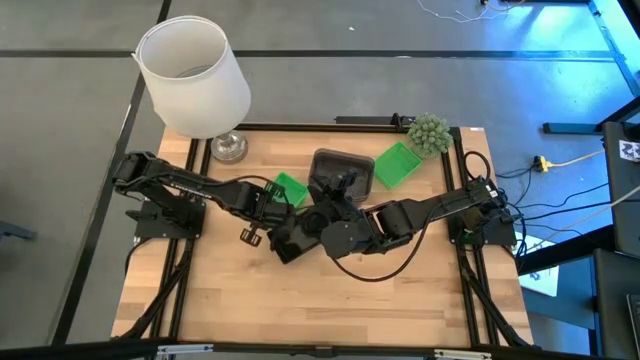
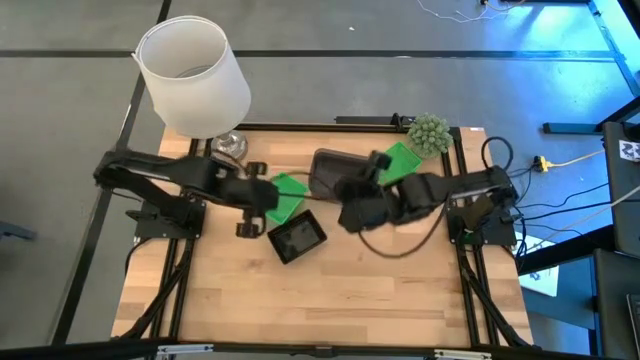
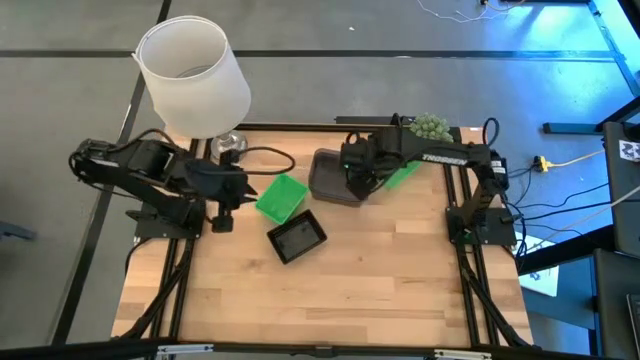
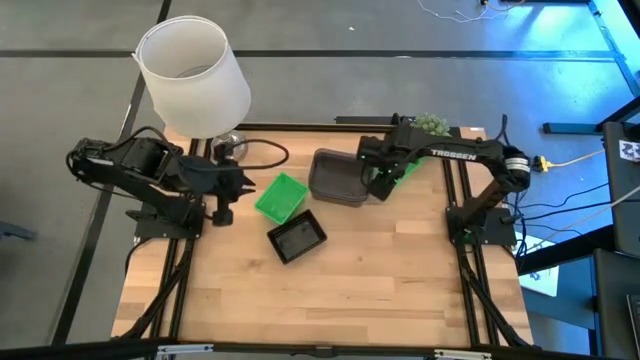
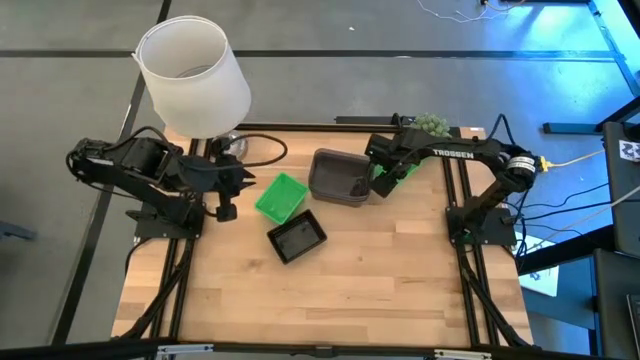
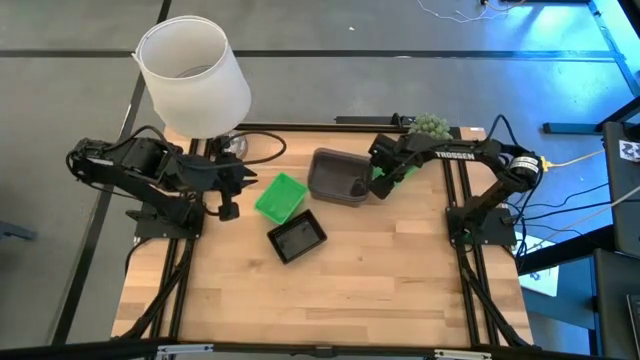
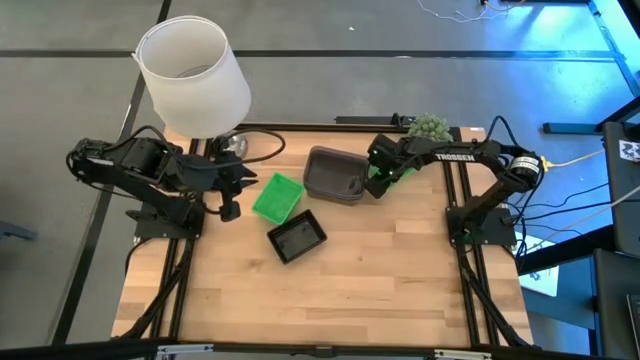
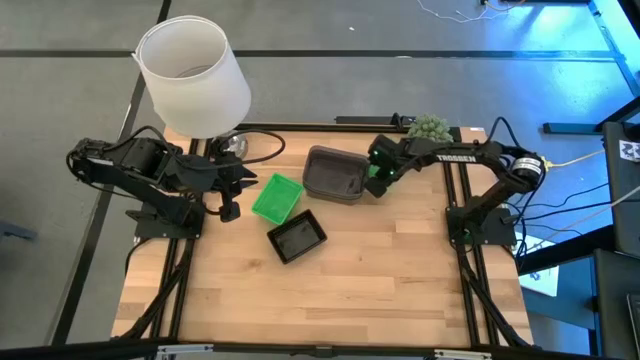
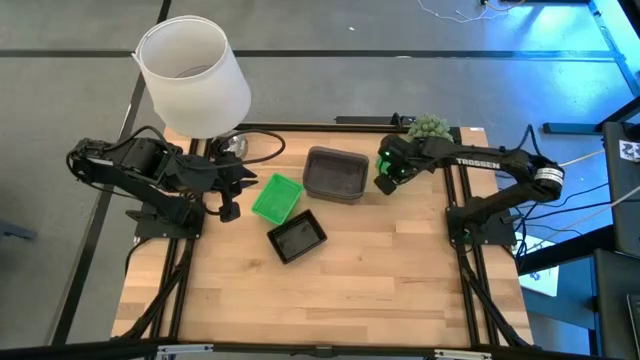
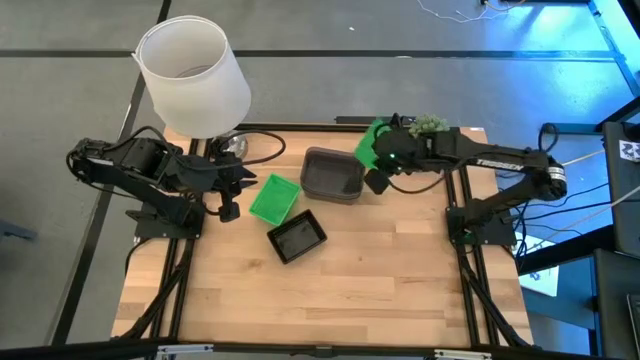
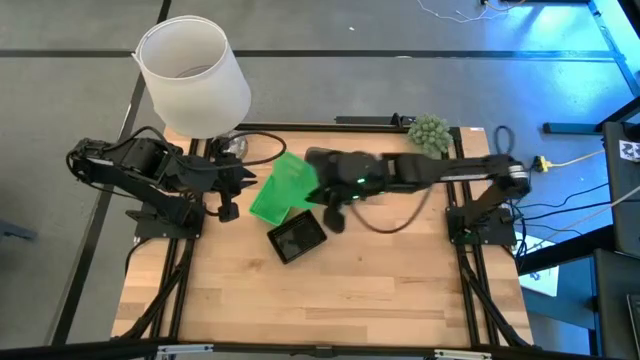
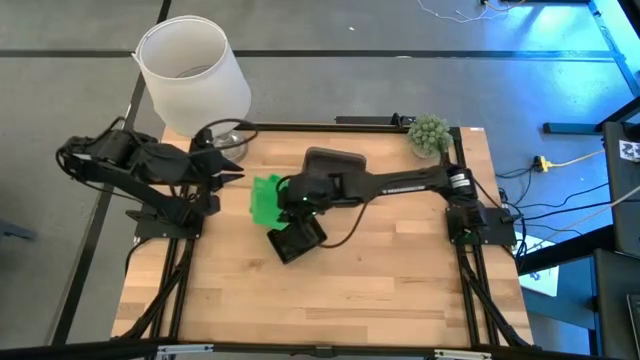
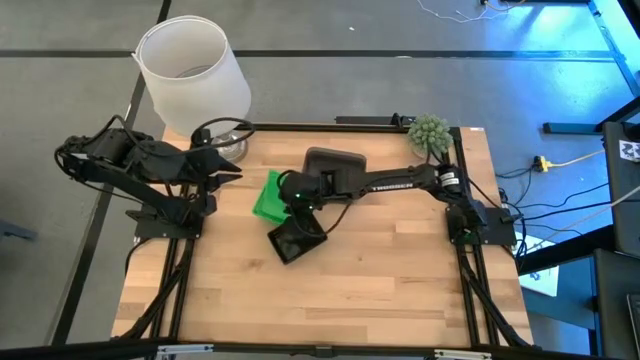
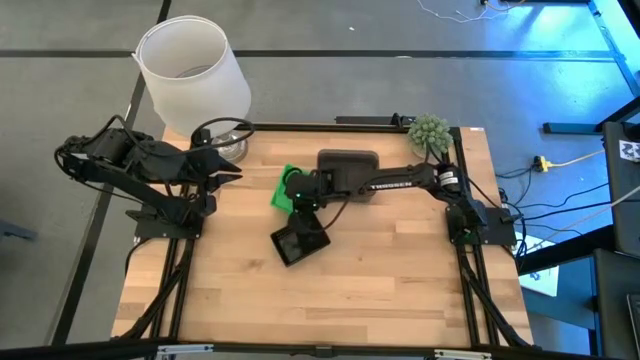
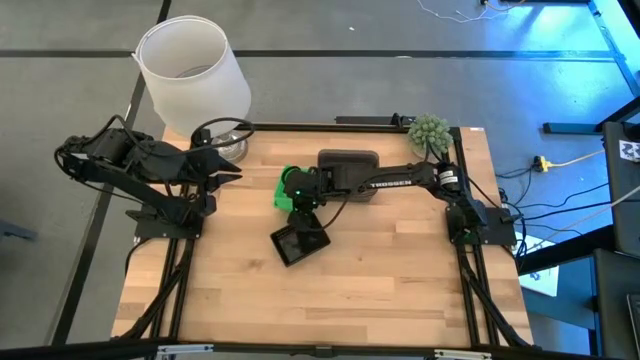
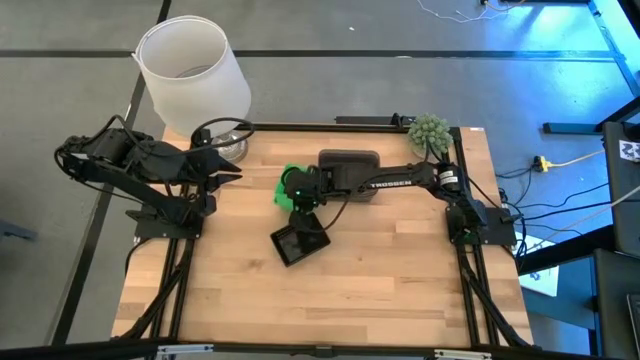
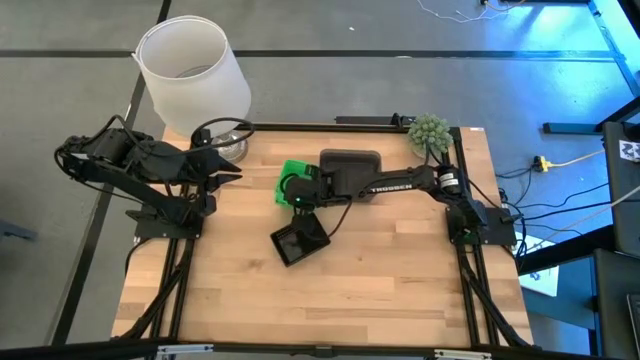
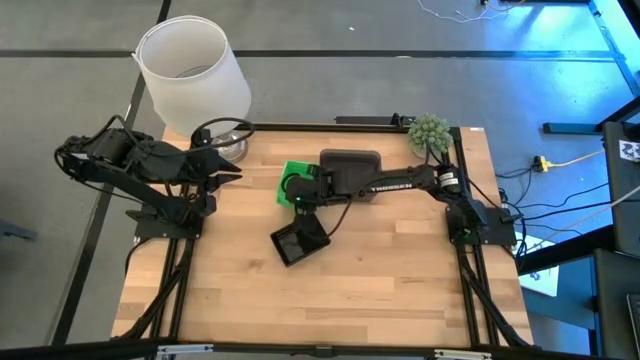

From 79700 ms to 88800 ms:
Stack the right green basket on top of the left green basket

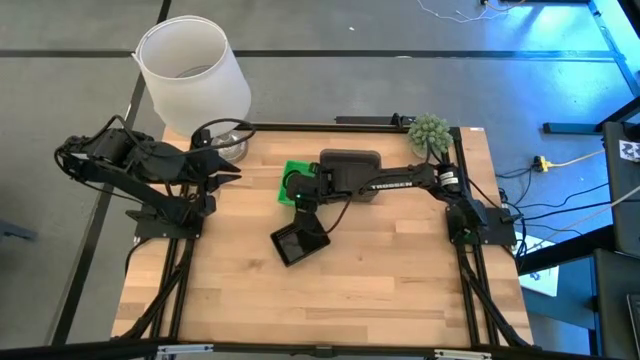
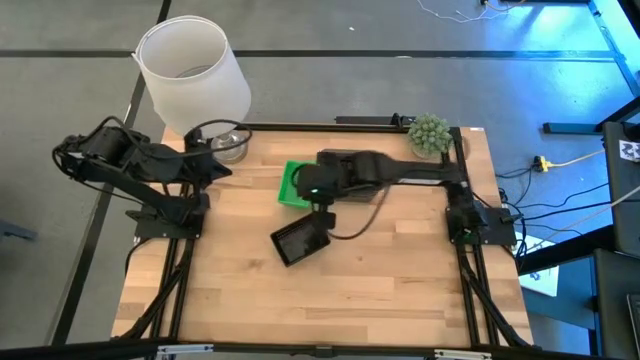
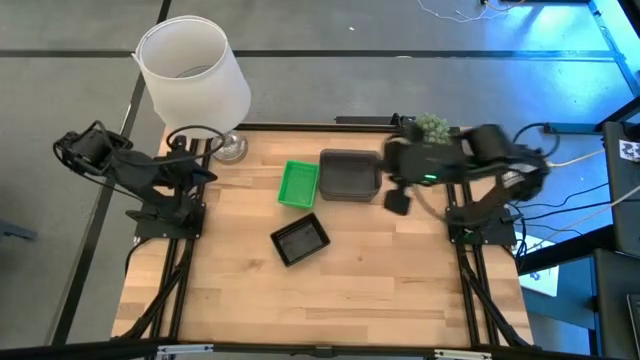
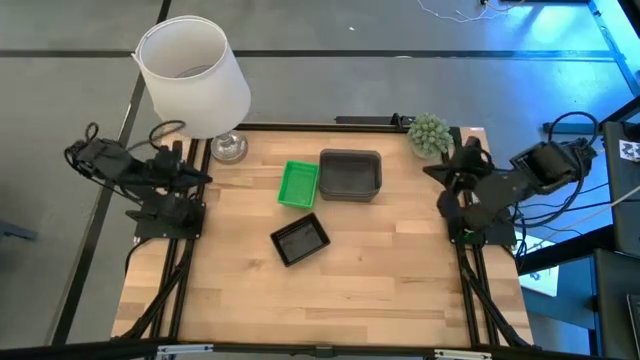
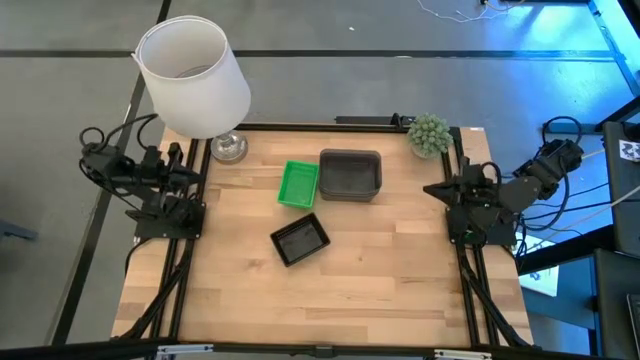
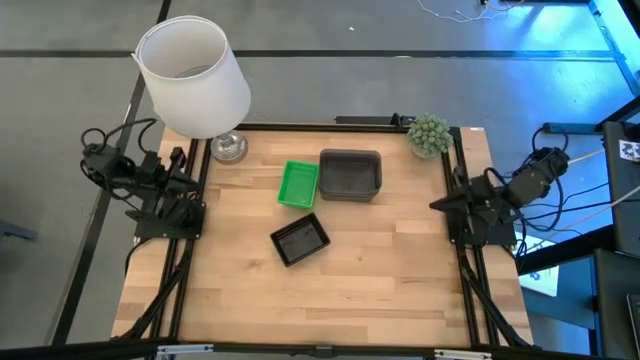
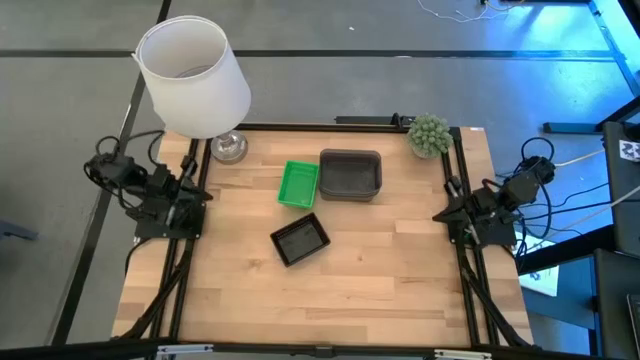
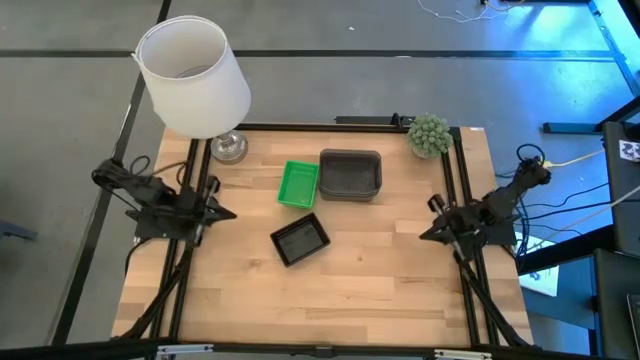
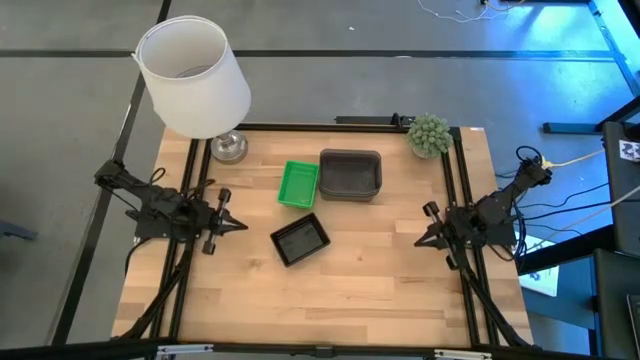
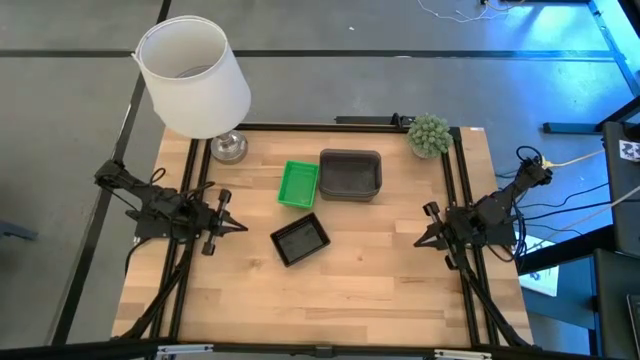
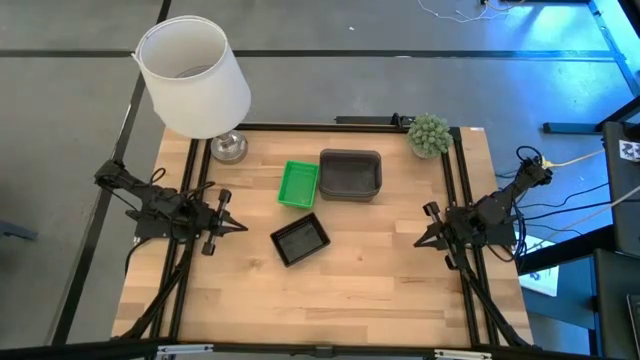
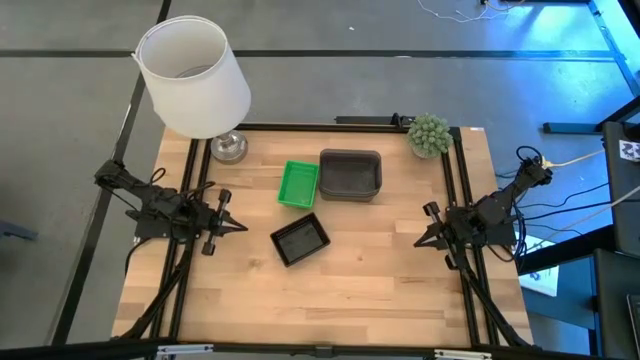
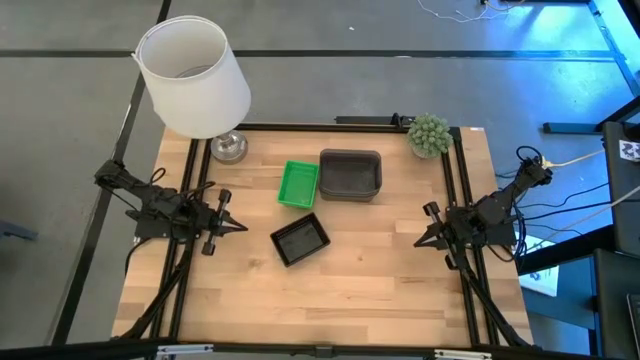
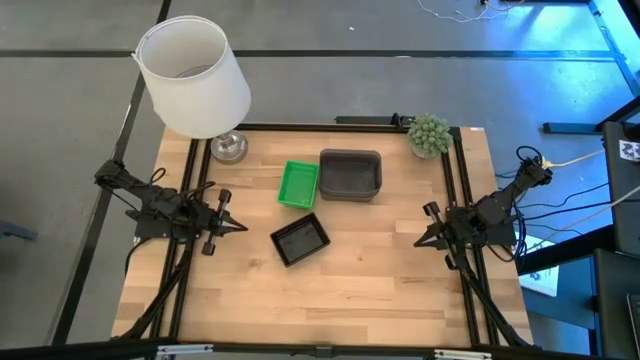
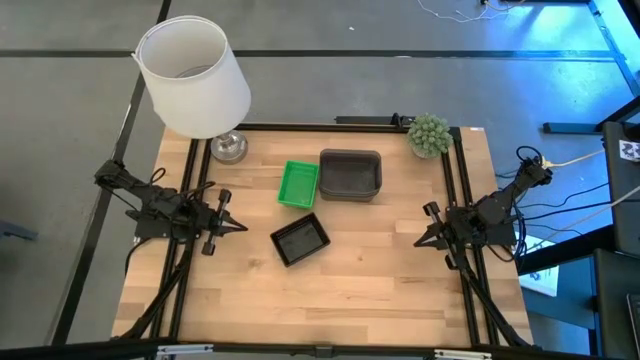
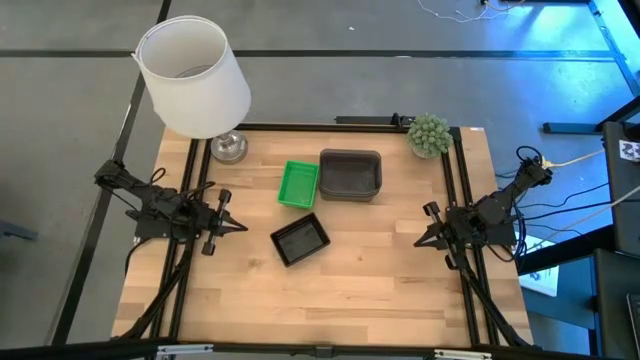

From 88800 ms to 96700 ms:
Return to Home Position
